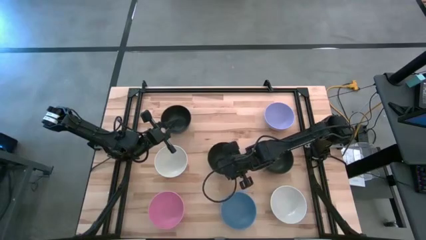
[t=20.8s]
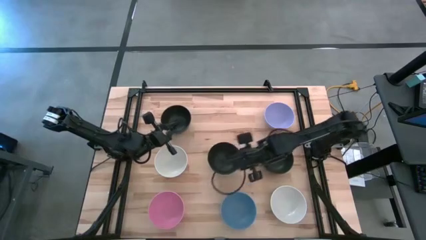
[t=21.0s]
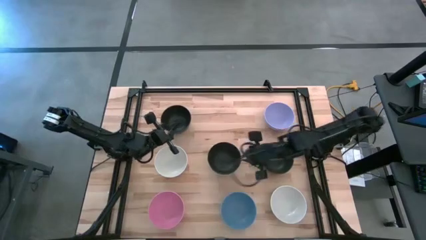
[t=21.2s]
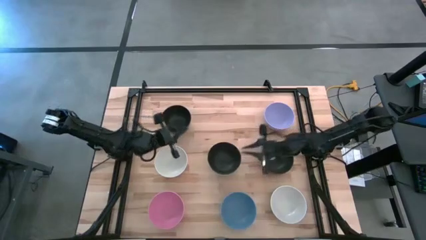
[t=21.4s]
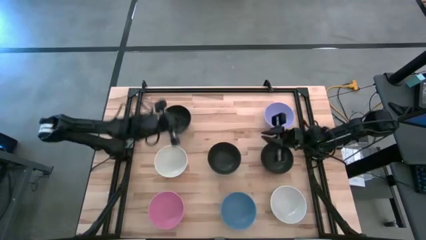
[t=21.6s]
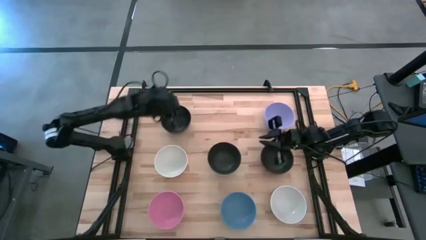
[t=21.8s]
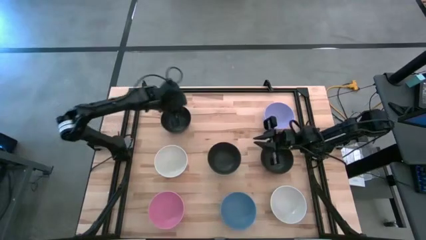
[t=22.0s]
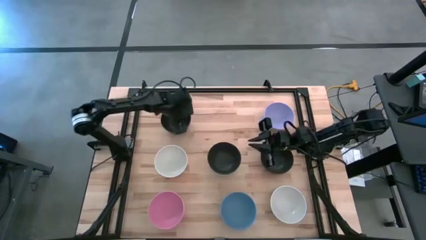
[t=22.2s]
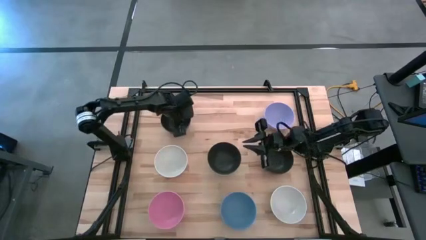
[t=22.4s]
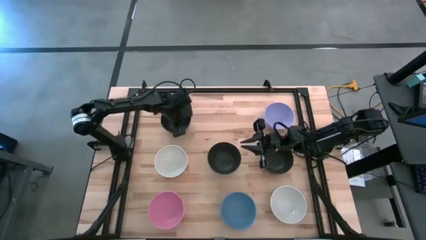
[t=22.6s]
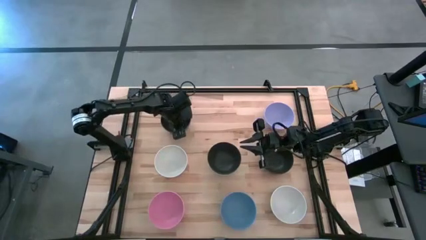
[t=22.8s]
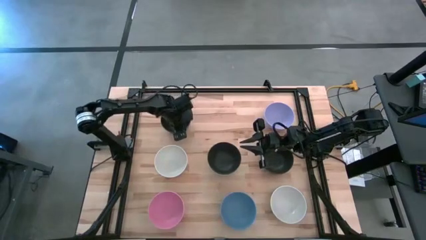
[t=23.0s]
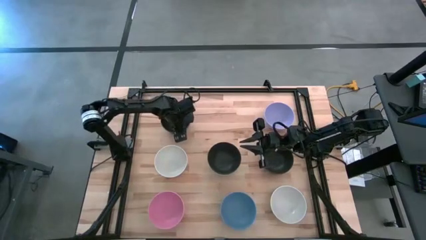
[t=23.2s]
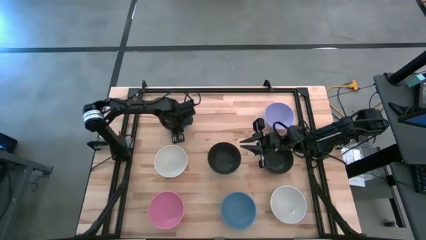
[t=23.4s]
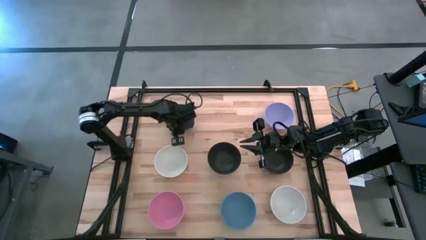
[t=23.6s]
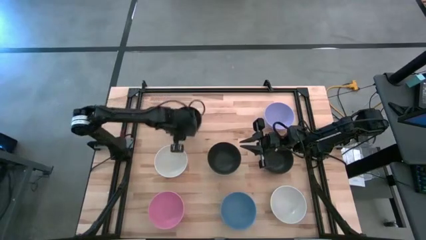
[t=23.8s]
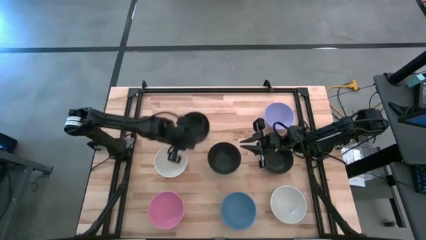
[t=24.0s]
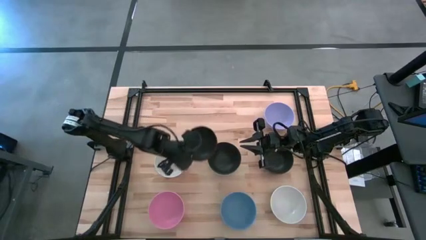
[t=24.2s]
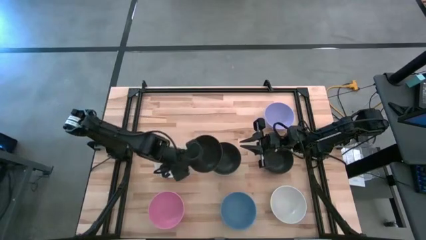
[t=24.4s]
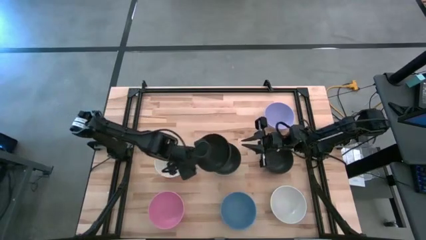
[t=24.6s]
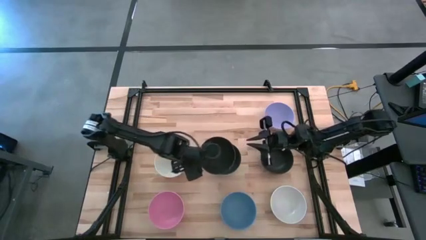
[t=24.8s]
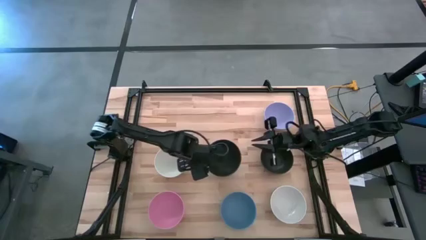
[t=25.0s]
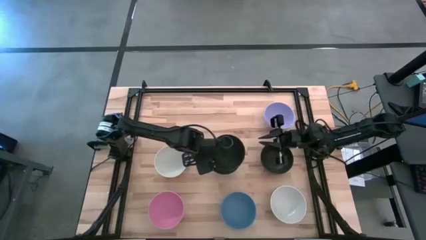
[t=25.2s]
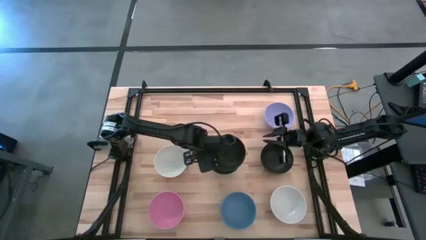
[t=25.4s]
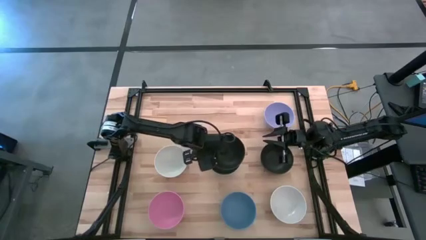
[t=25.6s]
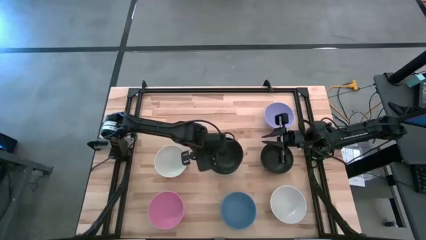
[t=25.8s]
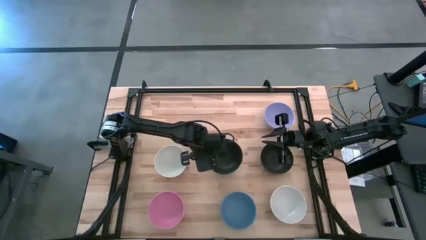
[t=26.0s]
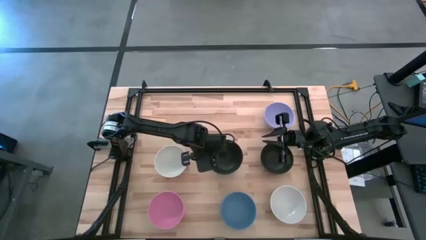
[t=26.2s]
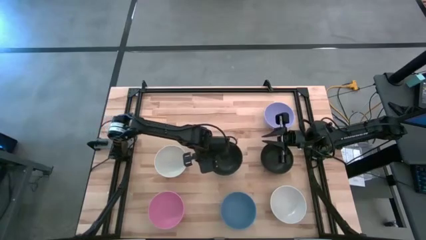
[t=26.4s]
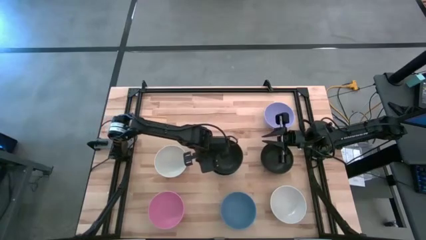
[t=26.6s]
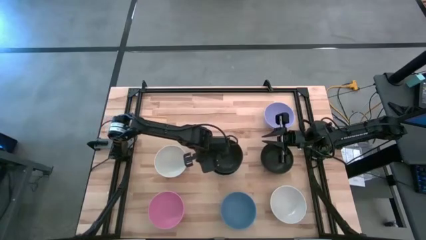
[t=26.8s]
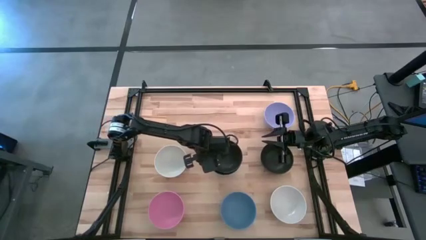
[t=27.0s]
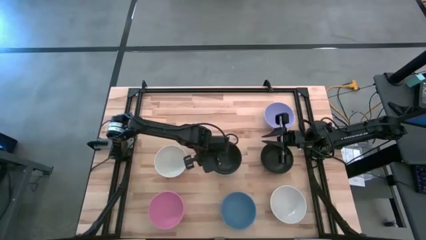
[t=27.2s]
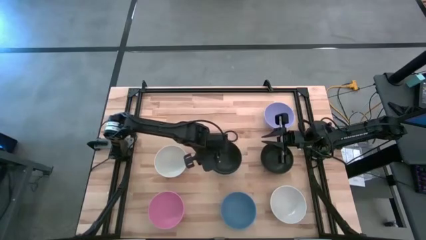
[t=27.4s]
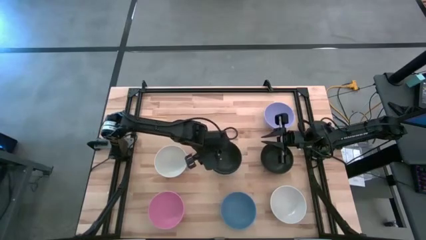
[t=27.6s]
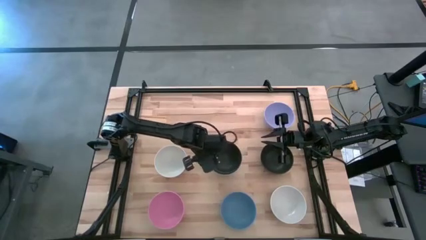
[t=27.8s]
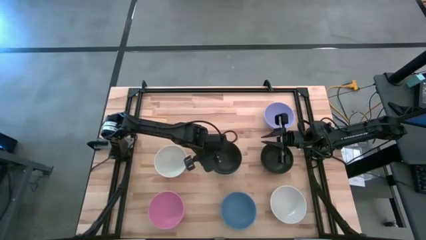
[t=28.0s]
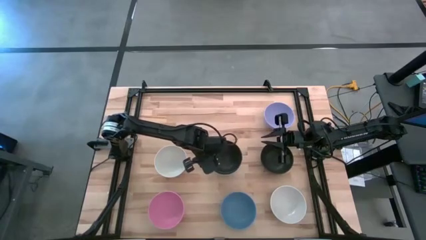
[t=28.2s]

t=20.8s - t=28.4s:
Task: Nest bowls inside each other
Stack the left black bowl on the middle black bowl

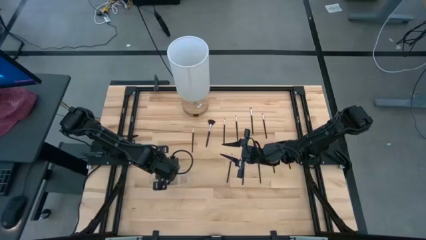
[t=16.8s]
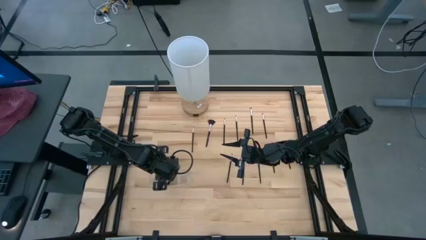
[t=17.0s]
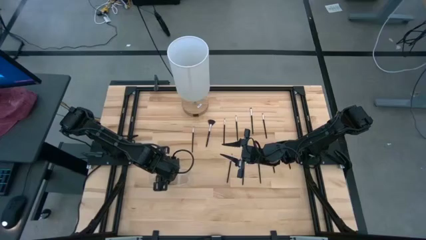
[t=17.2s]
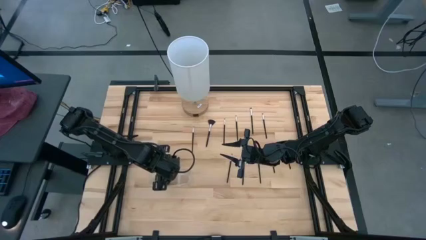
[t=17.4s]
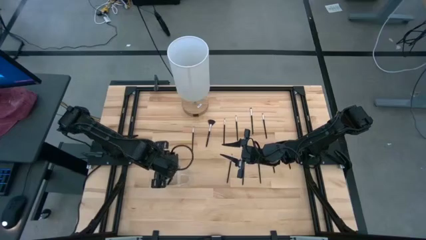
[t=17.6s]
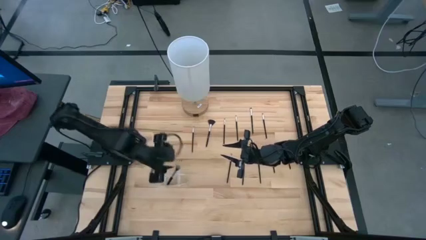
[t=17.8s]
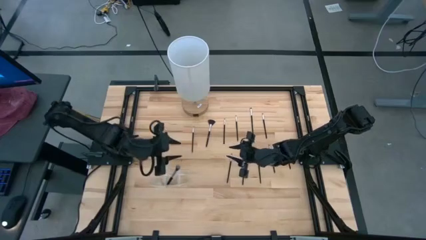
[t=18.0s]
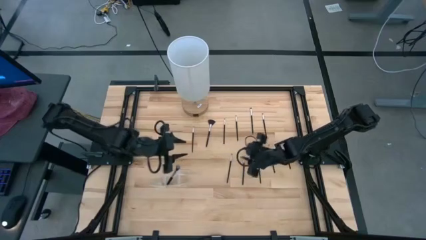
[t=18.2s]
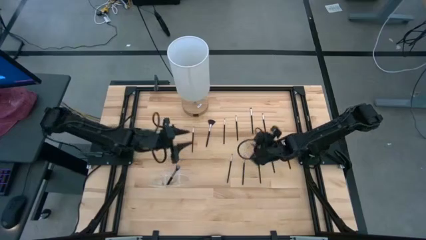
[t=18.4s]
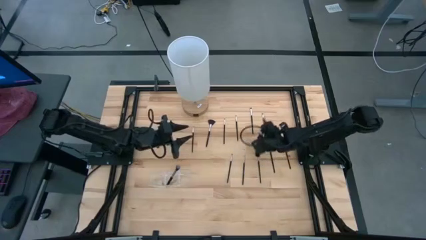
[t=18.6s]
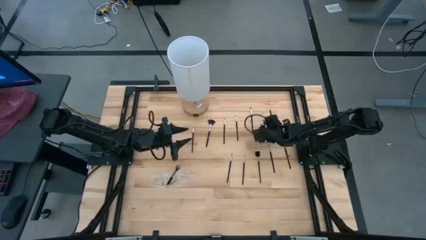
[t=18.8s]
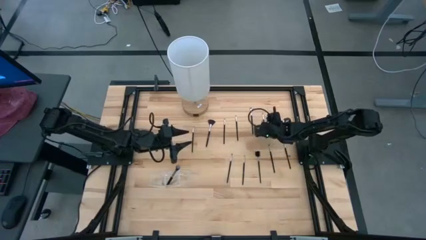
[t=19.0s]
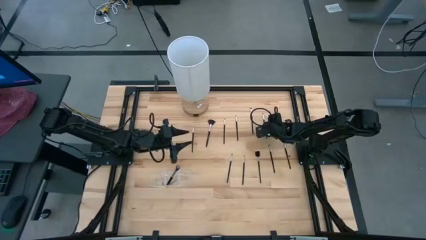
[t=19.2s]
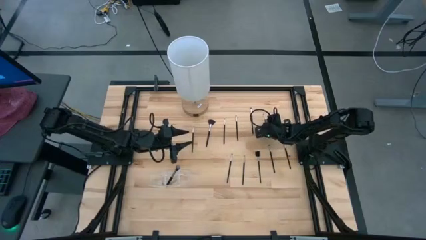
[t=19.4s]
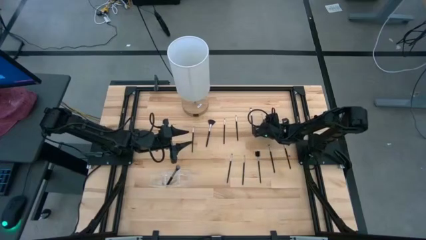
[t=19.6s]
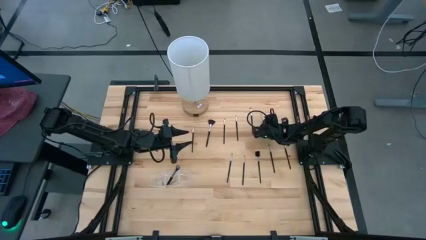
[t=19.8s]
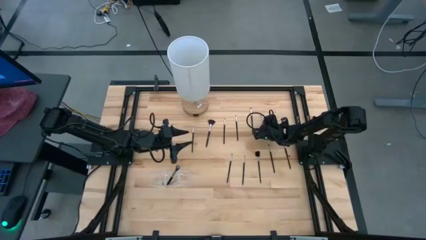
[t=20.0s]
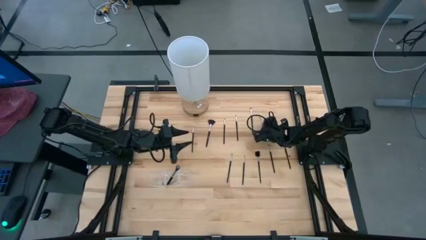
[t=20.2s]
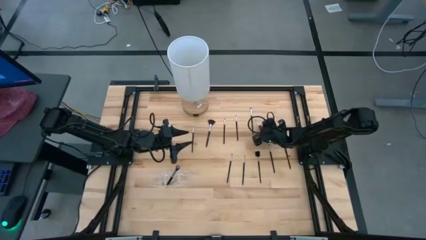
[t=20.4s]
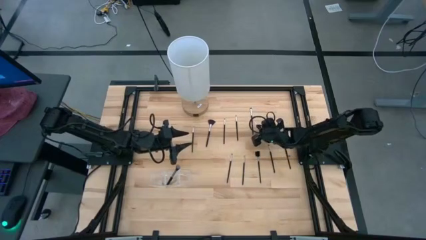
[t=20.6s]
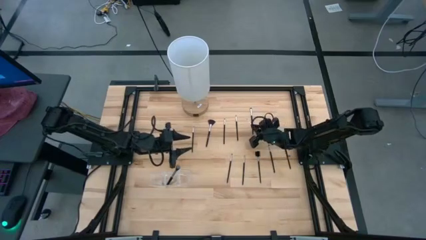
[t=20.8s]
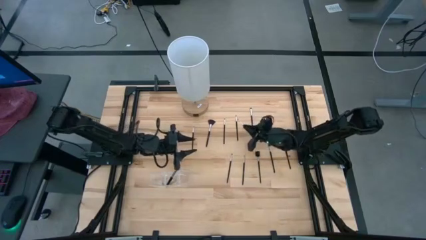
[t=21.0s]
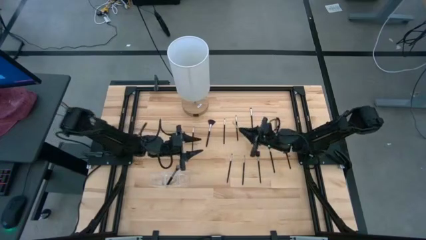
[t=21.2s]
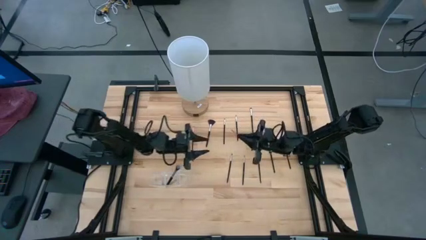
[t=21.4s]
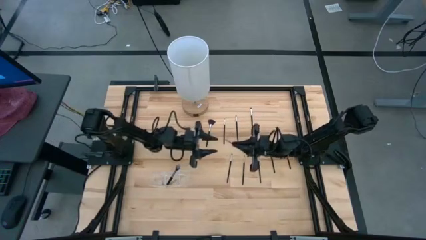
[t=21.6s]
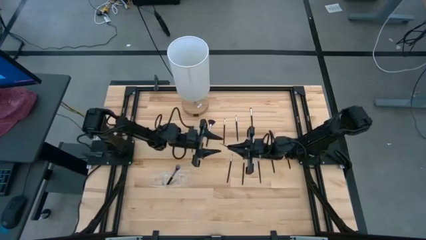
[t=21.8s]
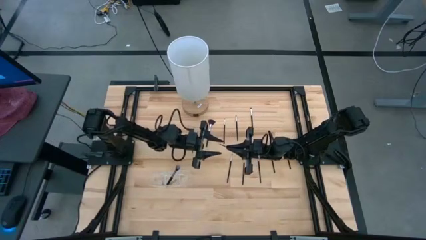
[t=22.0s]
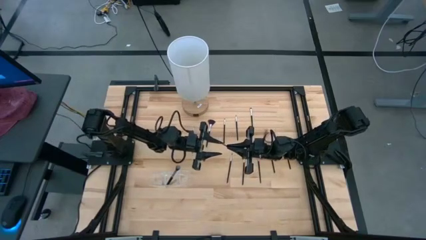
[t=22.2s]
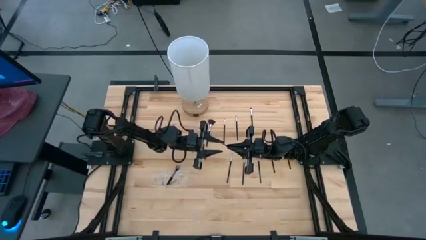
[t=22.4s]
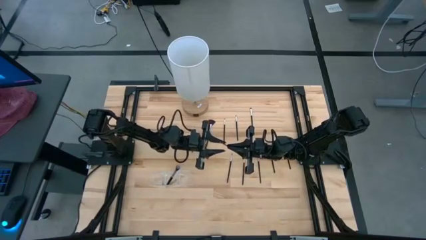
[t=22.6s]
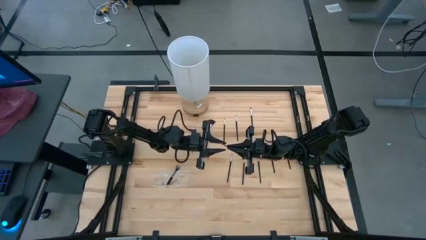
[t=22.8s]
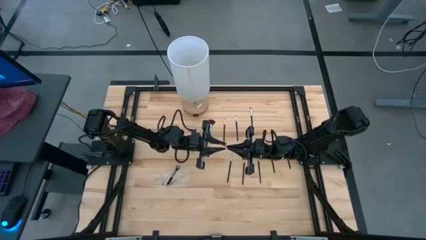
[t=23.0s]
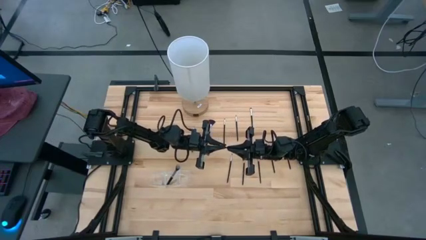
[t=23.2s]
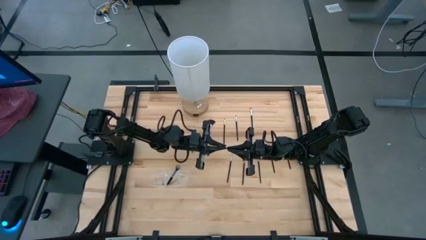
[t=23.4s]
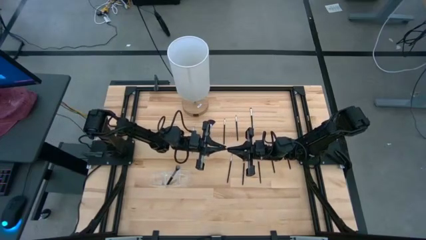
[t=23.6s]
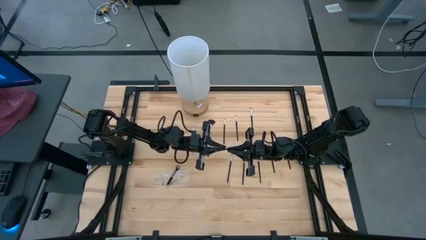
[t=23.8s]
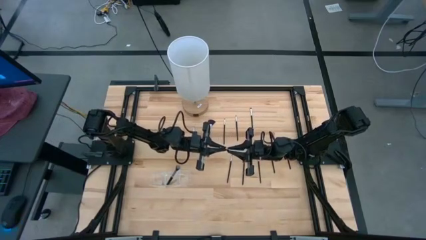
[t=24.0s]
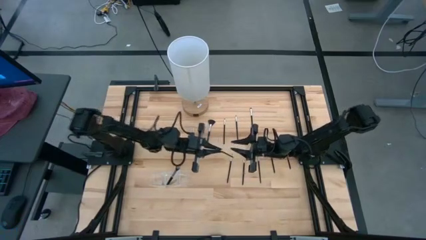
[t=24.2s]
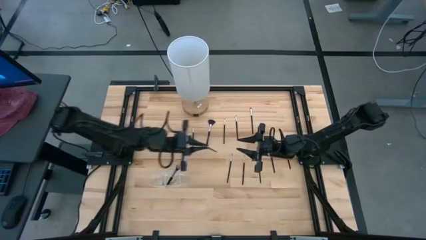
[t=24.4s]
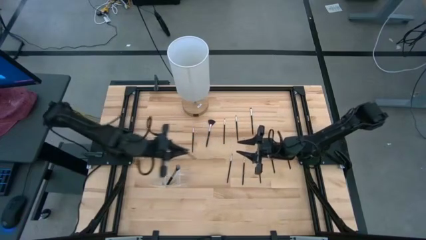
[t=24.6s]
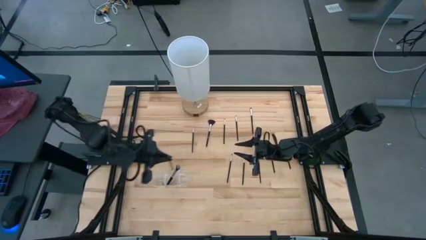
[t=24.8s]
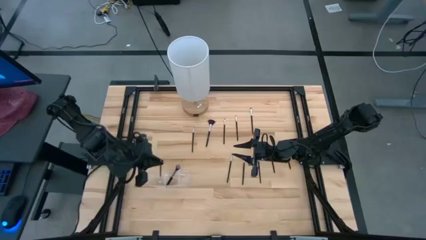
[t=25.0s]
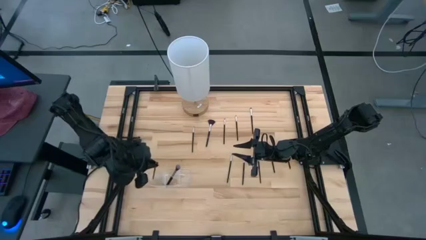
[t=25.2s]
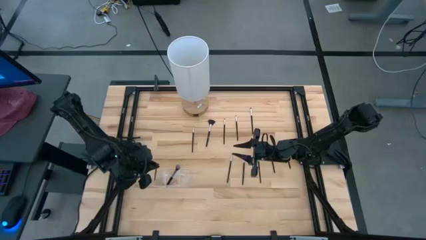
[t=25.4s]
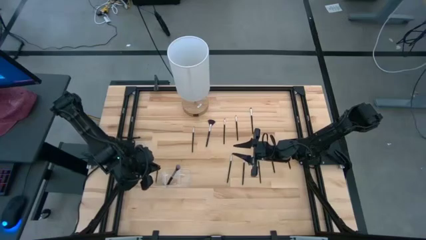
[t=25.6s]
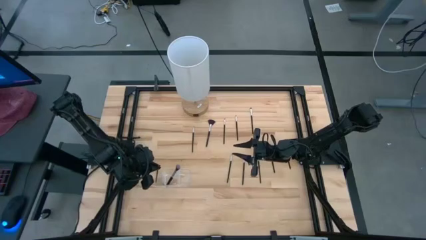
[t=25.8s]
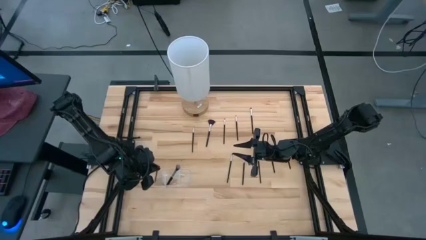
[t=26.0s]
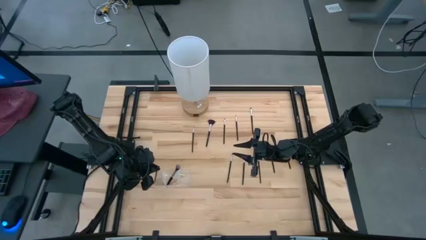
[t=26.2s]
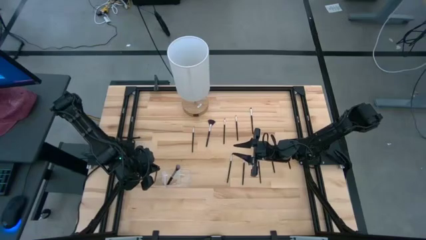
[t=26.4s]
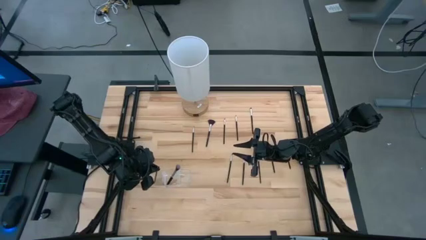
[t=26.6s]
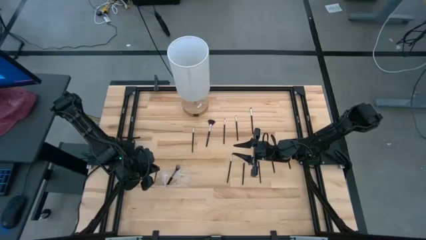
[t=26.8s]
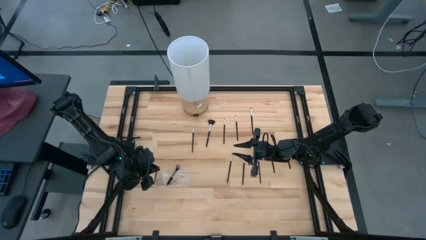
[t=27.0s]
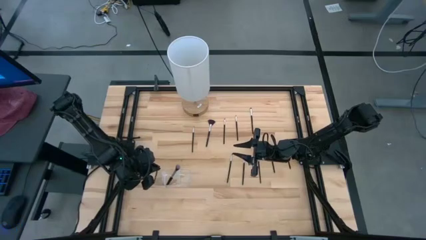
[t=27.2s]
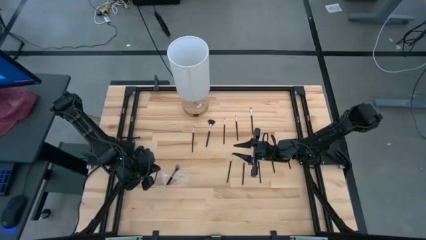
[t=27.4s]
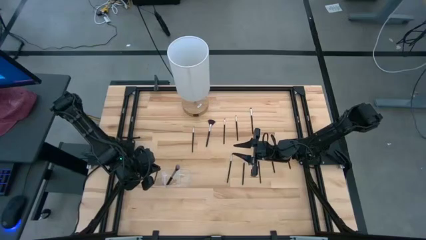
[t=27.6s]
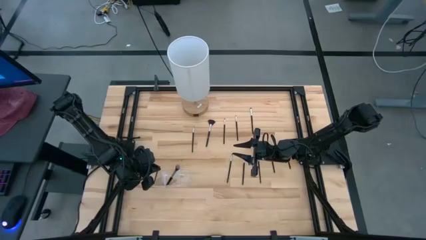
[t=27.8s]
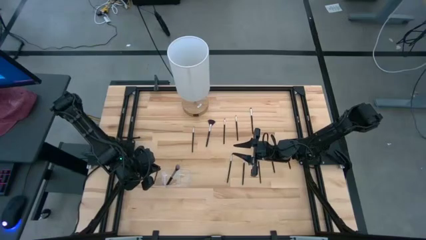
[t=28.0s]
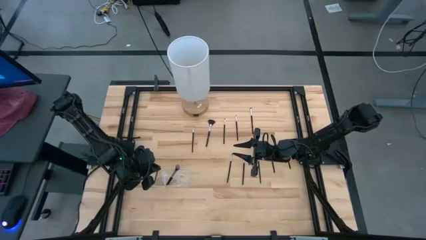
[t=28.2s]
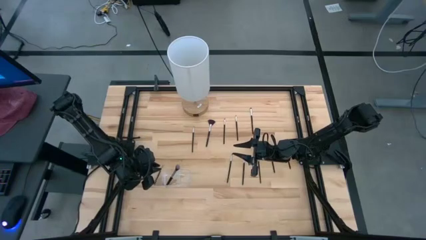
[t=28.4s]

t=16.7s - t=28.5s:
Task: Put items in baskets/containers
Put the eyeshadow brush in the transparent organizer
